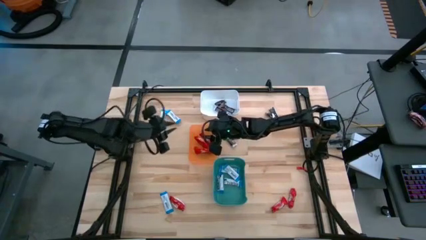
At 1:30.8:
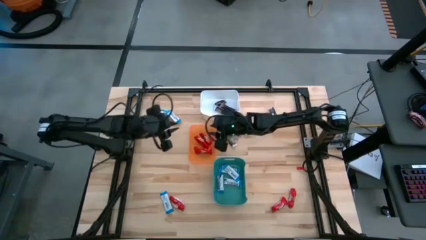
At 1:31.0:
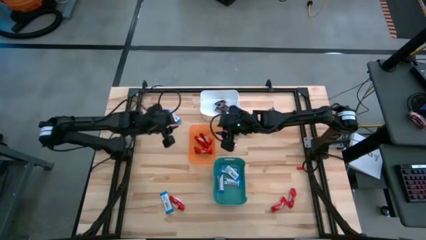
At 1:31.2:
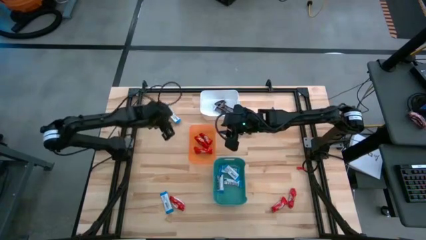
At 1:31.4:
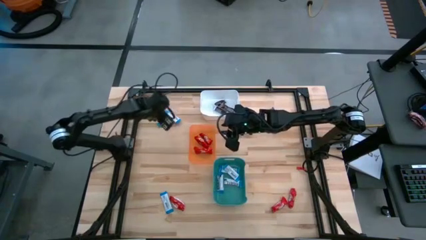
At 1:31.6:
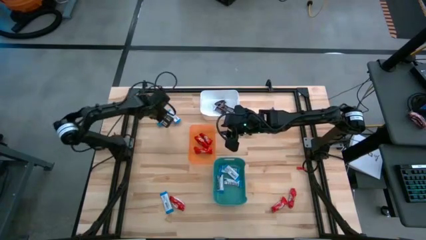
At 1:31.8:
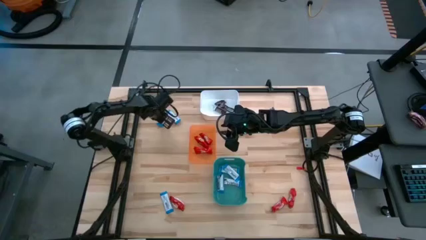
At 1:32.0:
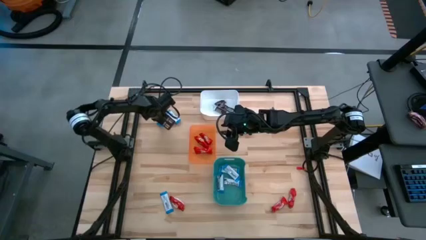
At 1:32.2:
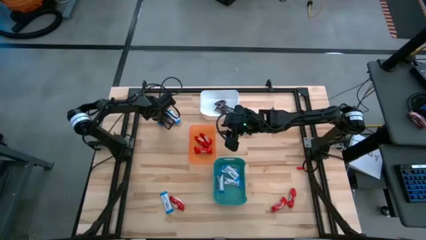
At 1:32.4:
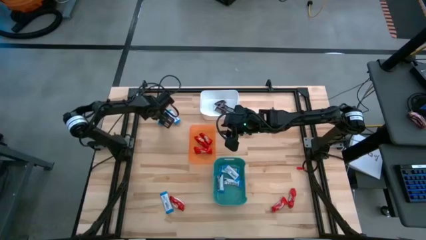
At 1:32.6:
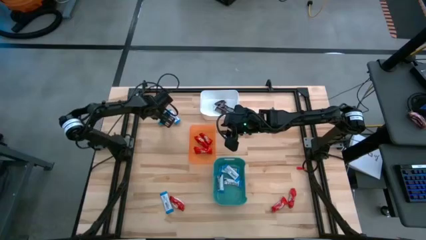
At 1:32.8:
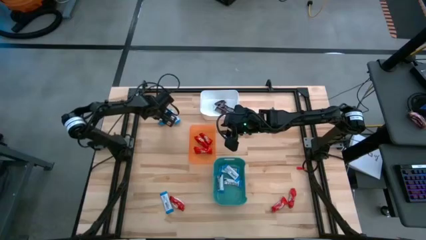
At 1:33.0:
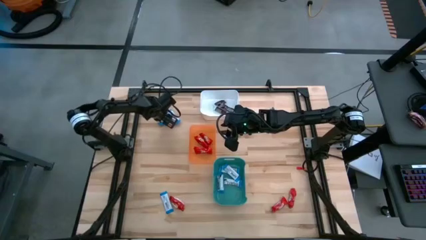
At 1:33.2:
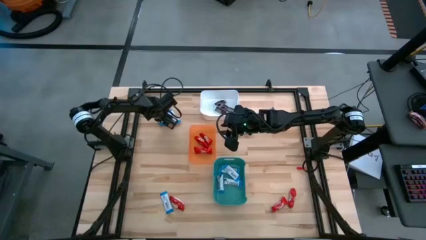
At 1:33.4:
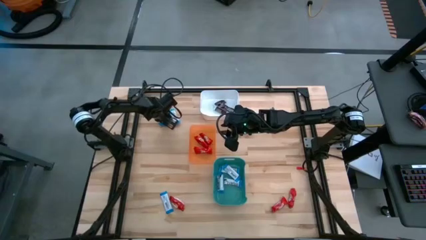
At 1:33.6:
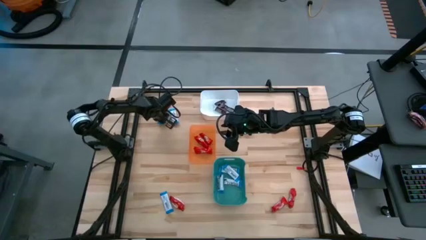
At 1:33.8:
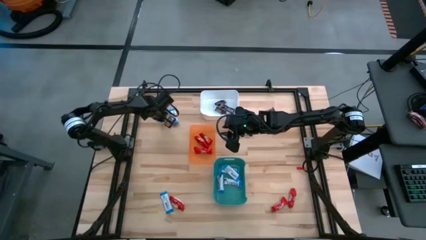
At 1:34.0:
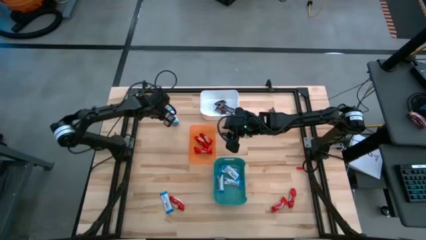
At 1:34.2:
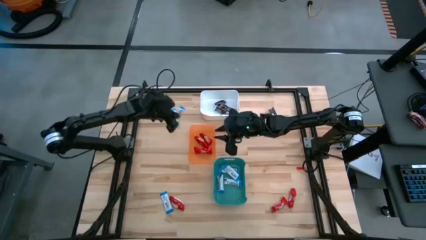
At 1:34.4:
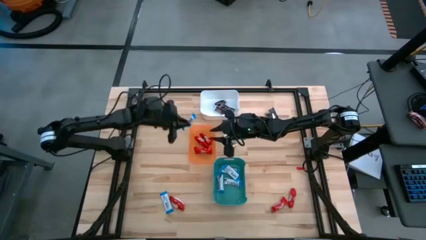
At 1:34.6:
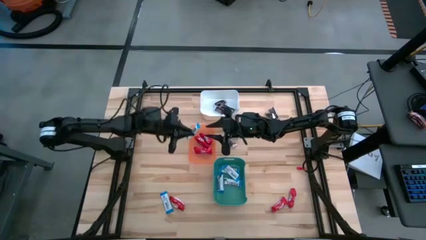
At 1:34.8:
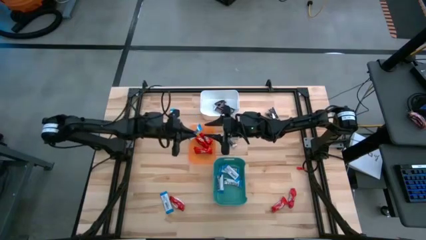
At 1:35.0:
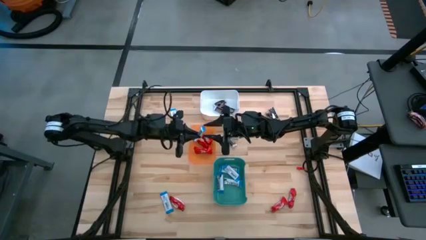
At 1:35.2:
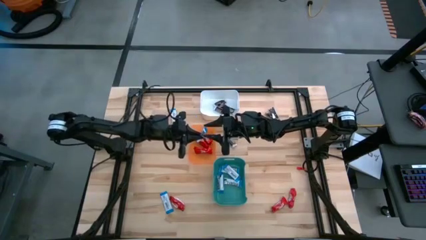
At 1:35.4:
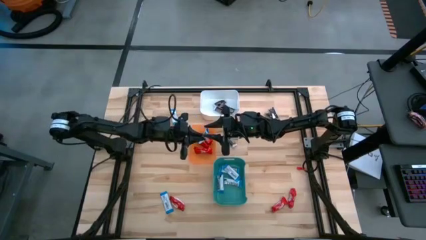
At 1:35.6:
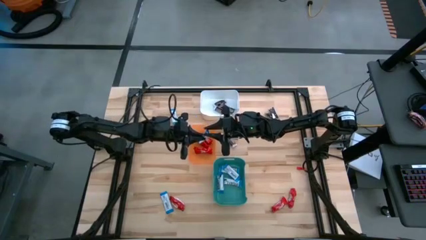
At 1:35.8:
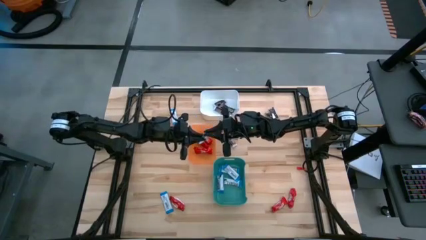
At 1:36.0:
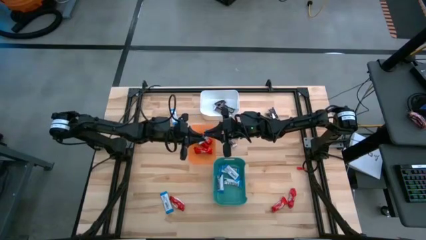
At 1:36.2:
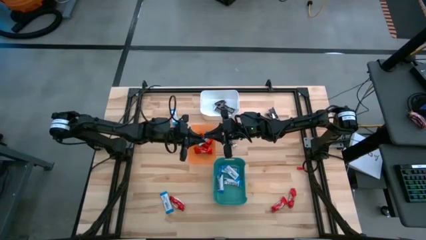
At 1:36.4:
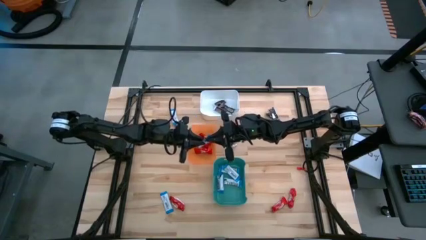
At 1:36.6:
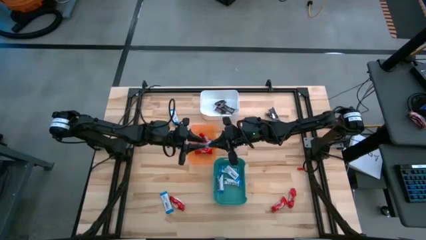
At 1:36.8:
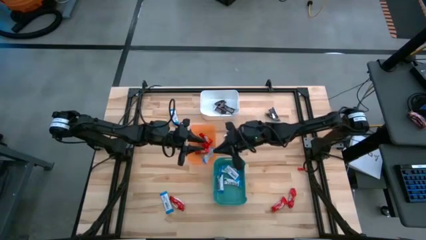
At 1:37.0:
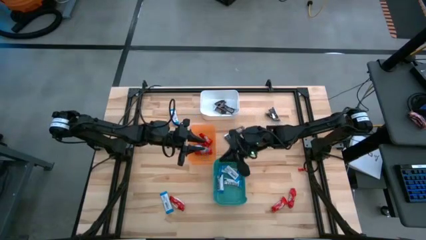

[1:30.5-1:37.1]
Task: Sort candy
Put the white chocolate bar into the green bin

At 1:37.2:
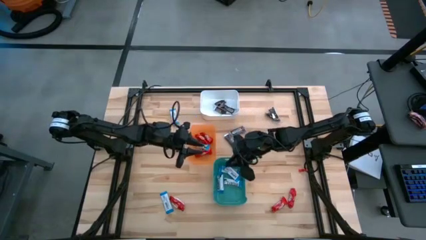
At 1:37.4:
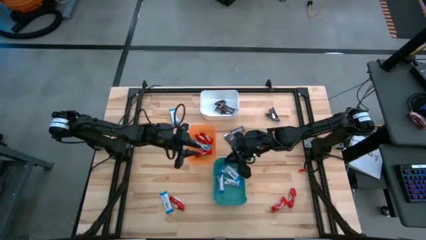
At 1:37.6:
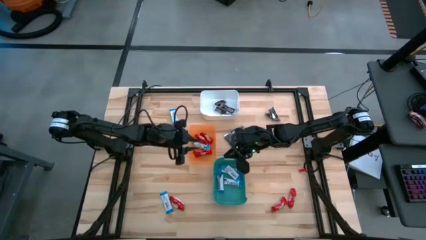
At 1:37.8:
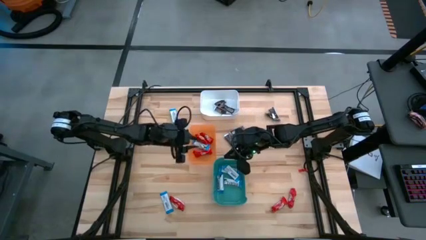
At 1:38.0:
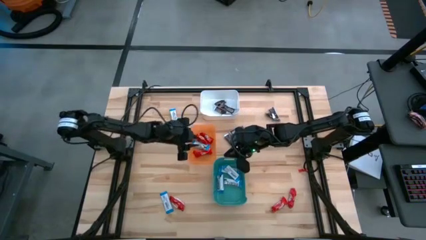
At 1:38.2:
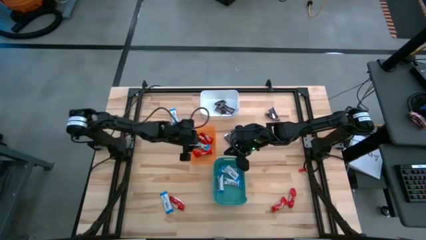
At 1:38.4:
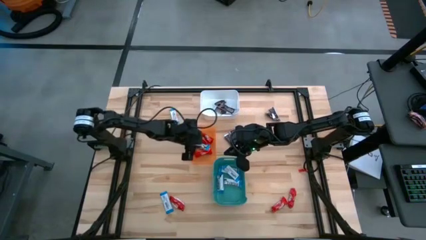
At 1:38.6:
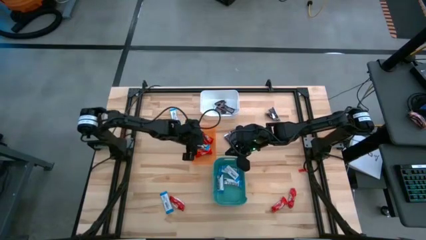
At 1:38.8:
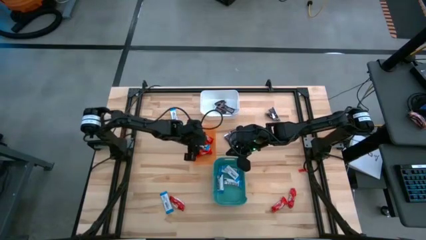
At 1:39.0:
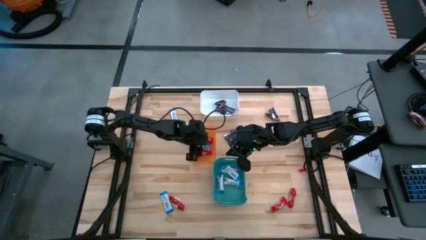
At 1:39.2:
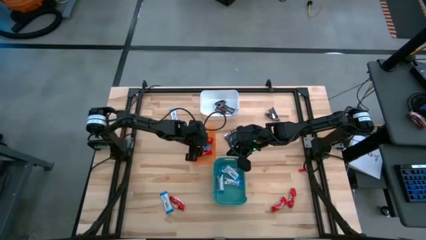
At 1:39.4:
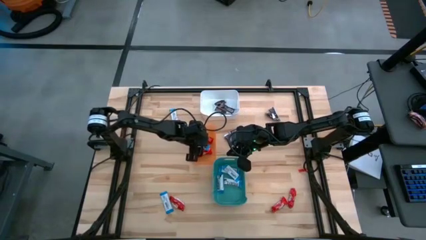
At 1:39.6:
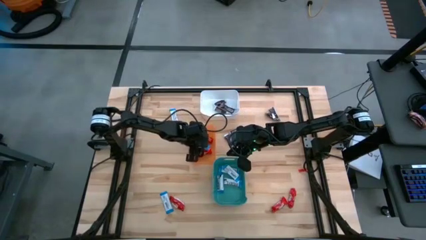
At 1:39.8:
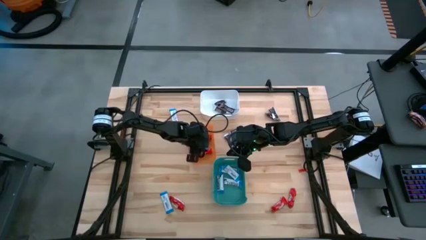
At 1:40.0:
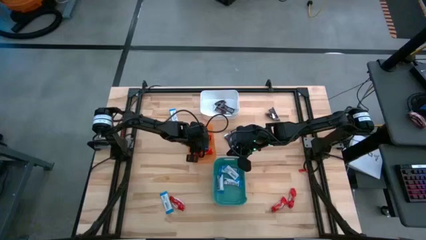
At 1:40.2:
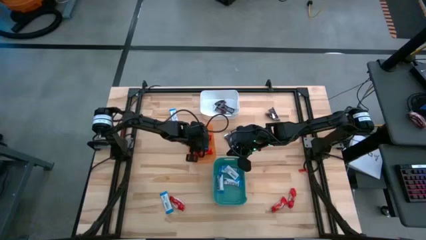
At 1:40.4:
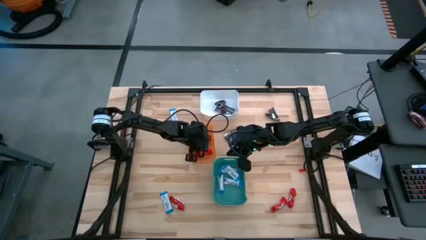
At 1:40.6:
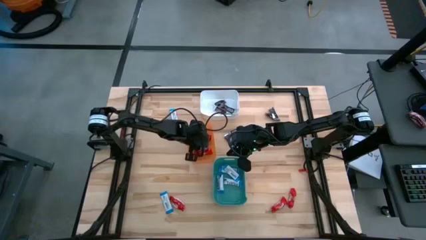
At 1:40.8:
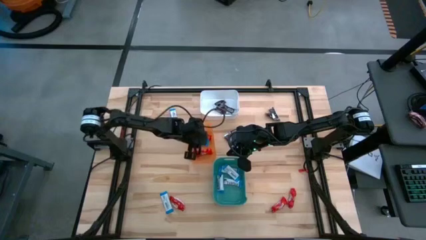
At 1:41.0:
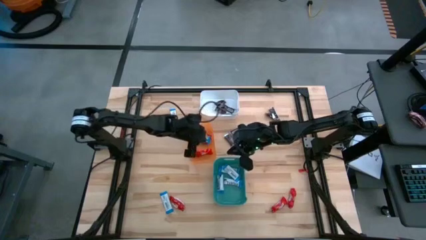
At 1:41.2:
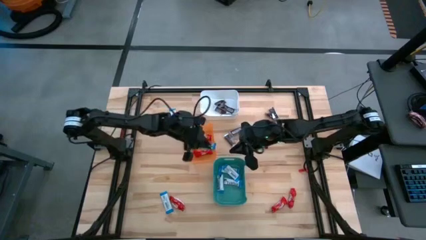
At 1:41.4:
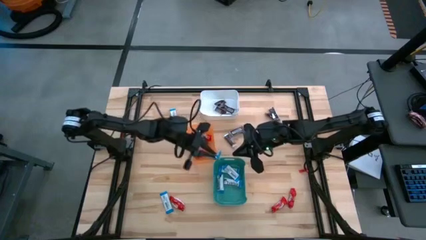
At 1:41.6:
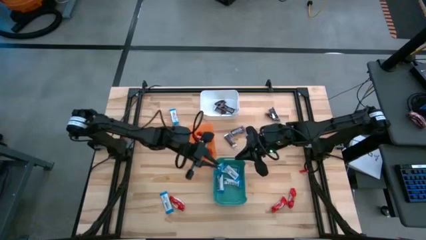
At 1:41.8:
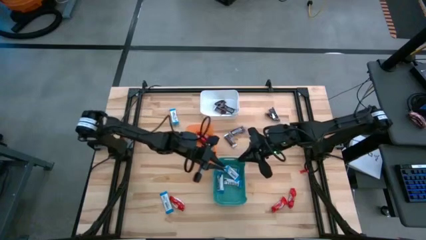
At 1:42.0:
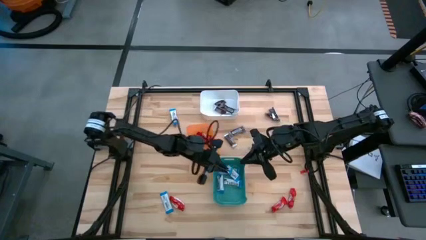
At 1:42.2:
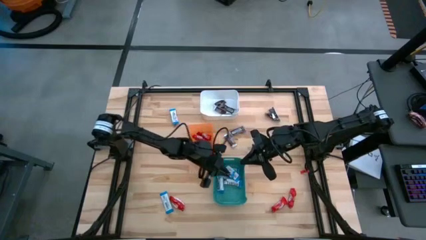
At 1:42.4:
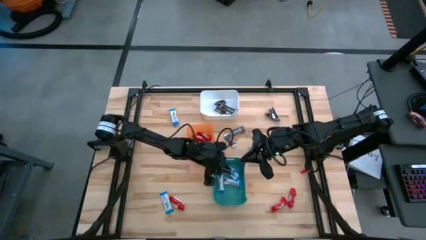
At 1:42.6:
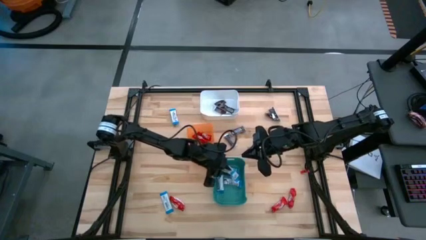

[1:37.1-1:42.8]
Put the white chocolate bar into the green bin

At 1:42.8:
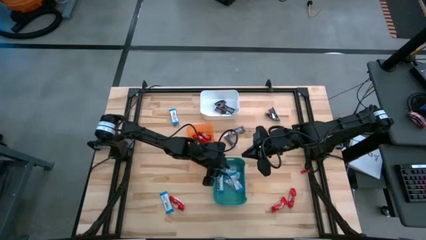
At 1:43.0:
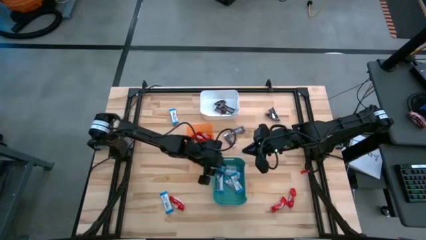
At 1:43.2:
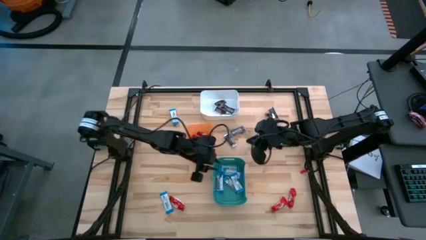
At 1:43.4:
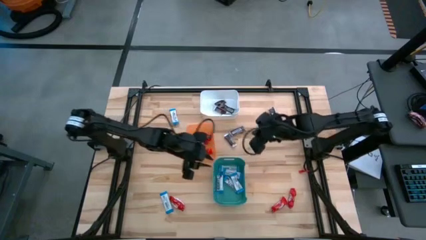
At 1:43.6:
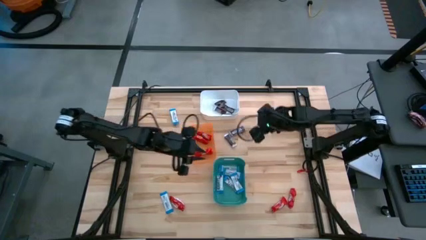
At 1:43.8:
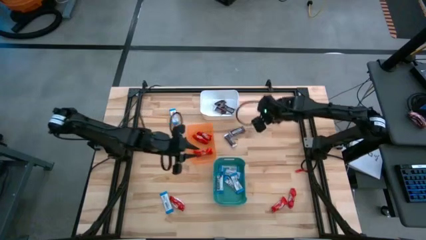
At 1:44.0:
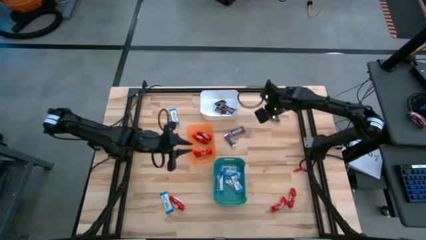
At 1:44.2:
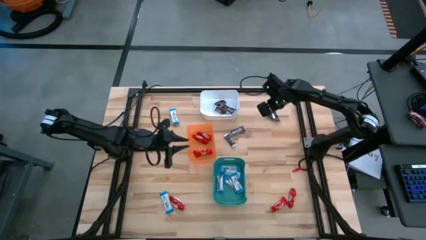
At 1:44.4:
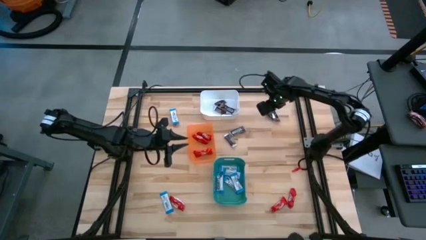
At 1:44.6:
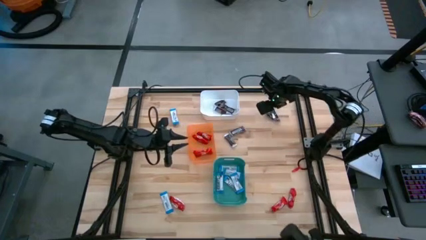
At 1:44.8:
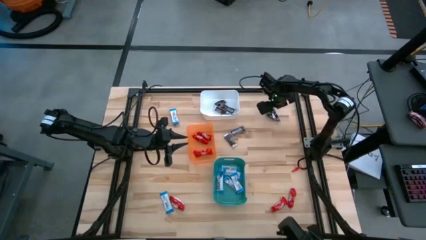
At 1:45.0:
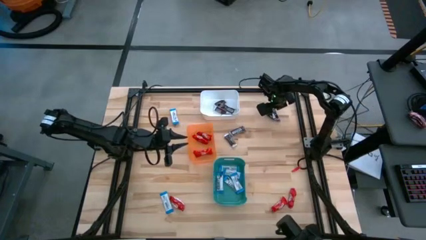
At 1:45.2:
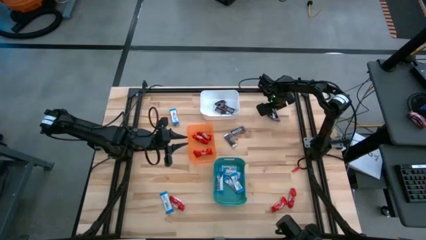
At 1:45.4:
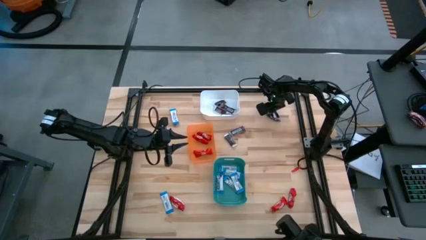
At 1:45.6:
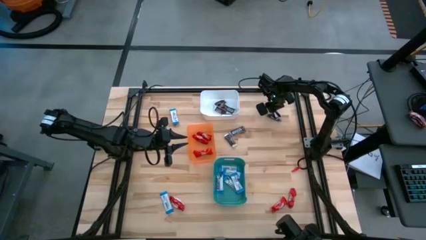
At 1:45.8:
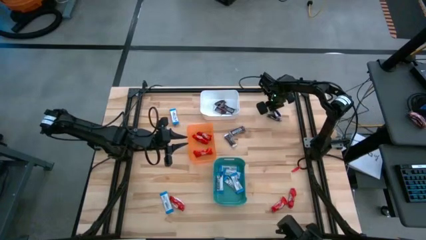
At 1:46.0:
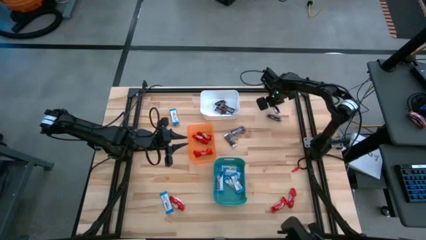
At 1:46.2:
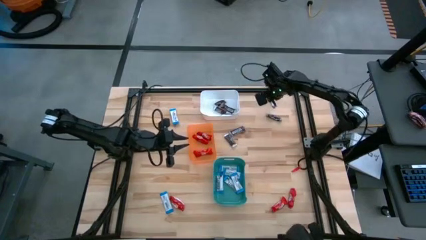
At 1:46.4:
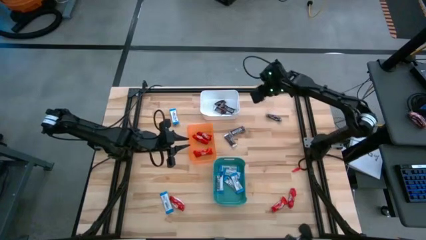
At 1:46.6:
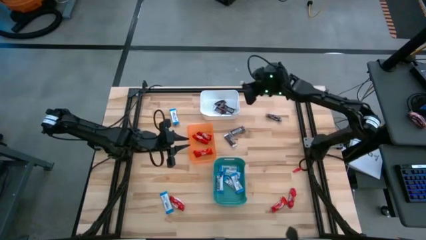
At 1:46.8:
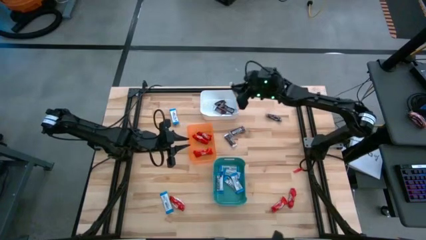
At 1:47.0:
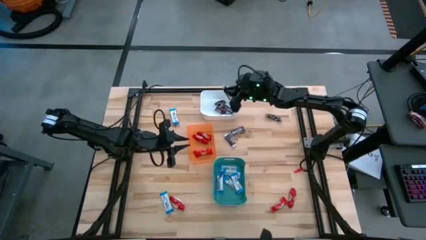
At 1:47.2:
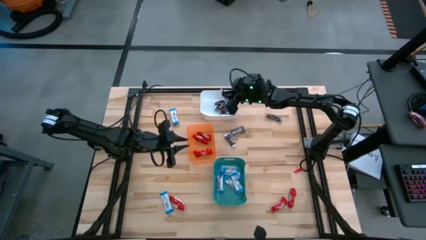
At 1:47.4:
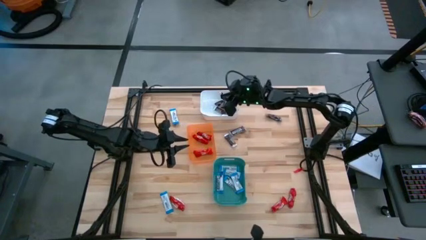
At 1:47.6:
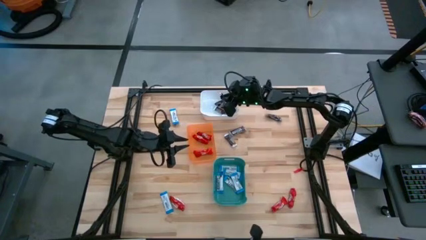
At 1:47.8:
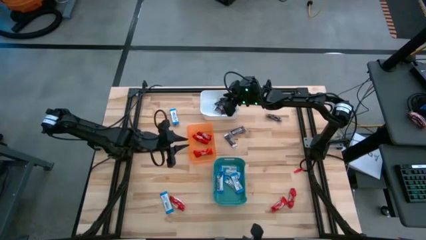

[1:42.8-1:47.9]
Put the brown chocolate bar into the white bin
